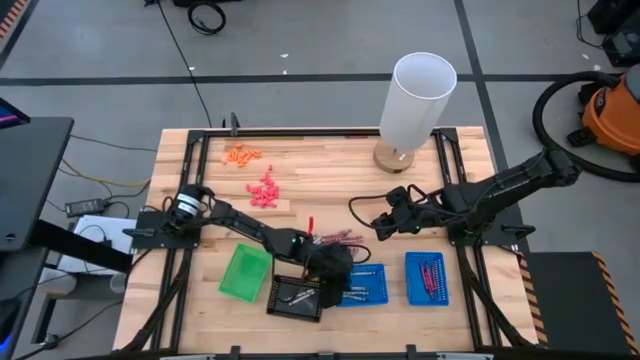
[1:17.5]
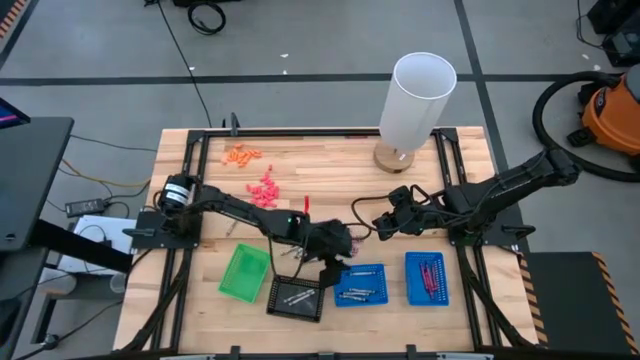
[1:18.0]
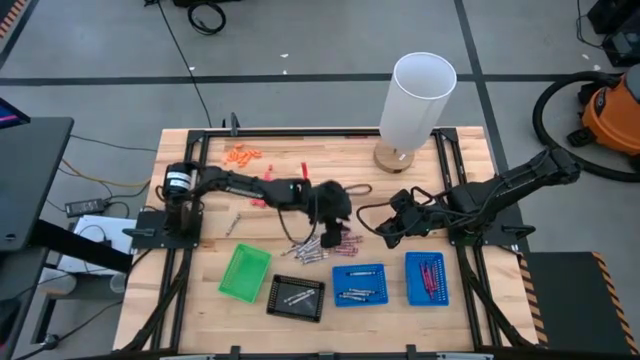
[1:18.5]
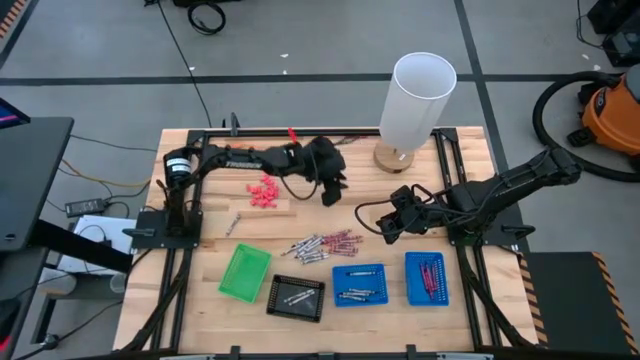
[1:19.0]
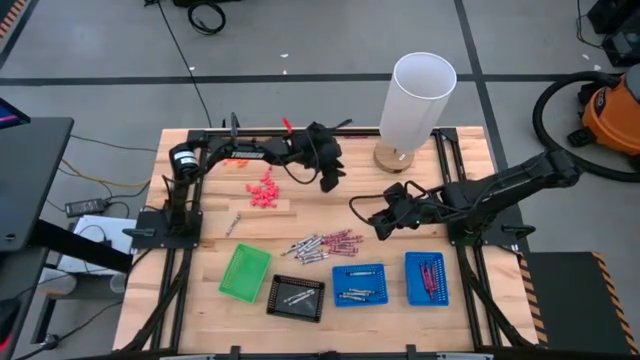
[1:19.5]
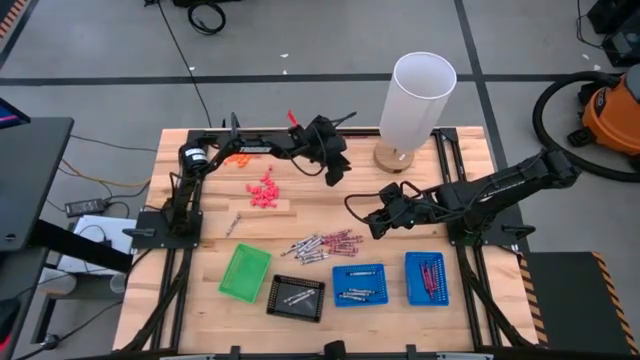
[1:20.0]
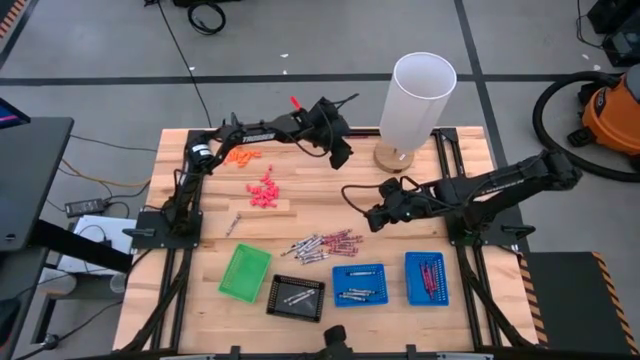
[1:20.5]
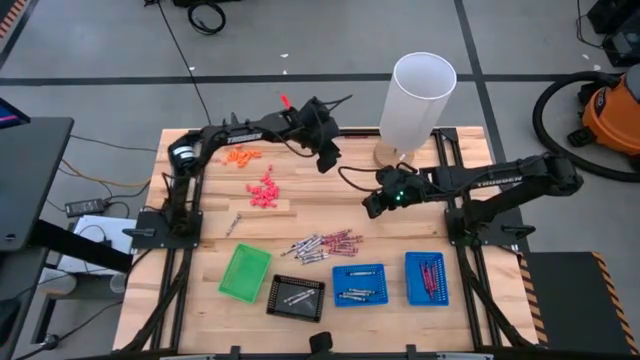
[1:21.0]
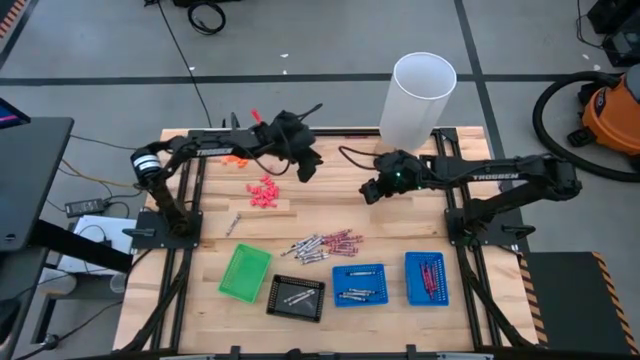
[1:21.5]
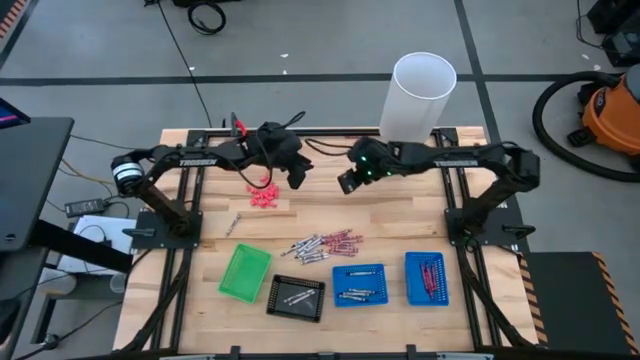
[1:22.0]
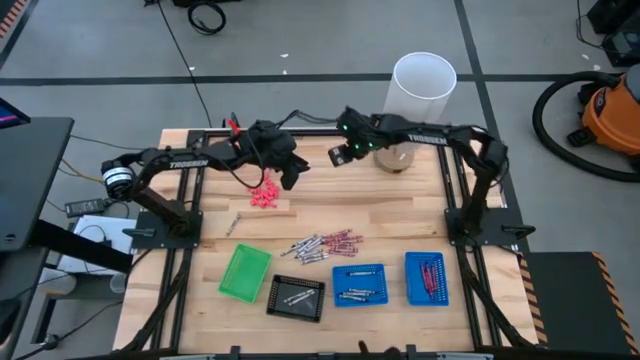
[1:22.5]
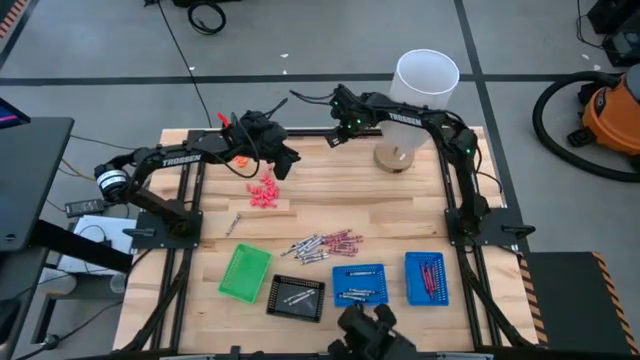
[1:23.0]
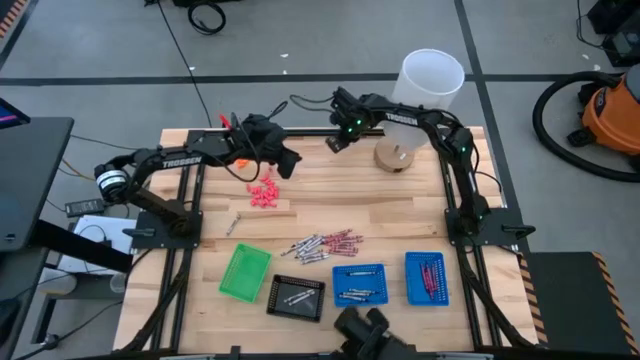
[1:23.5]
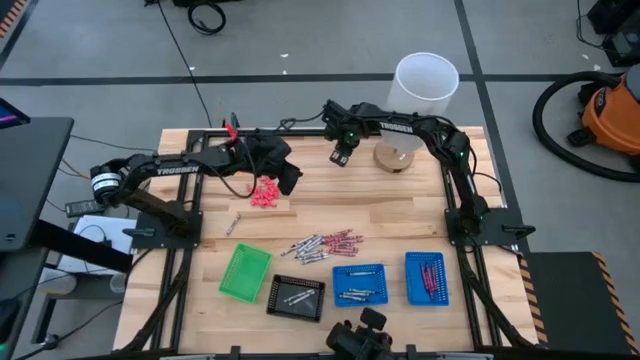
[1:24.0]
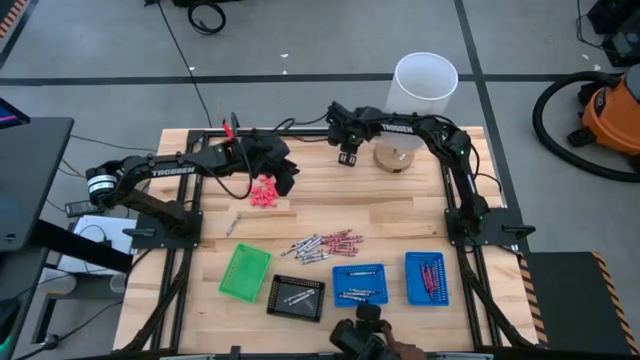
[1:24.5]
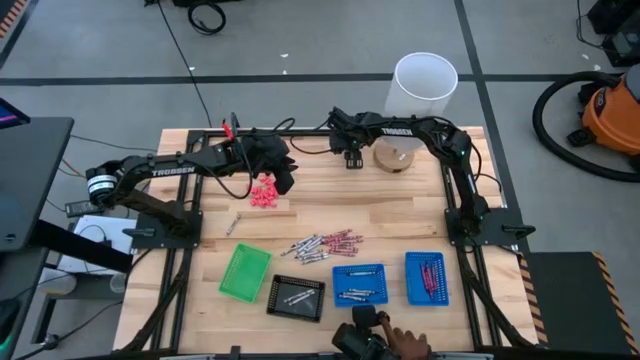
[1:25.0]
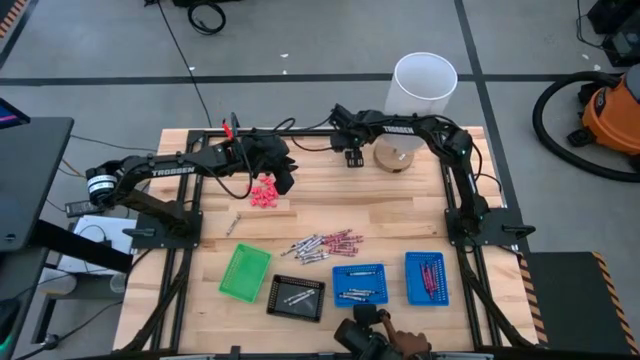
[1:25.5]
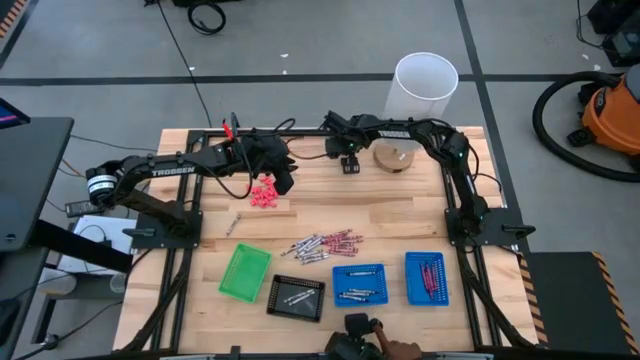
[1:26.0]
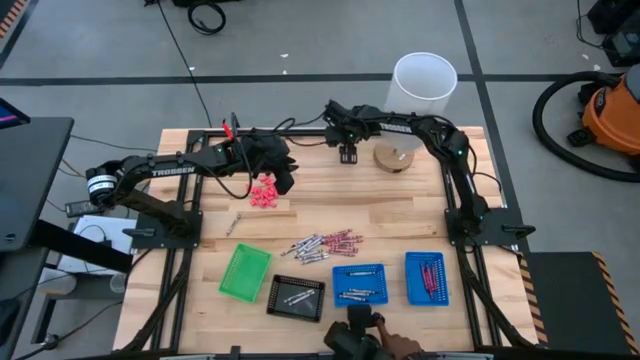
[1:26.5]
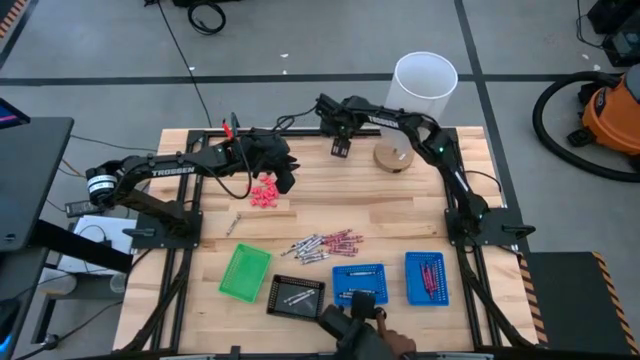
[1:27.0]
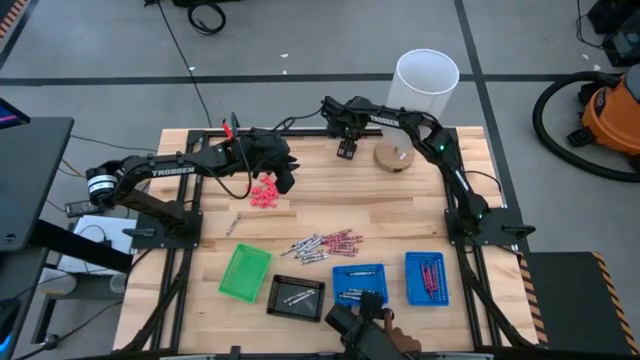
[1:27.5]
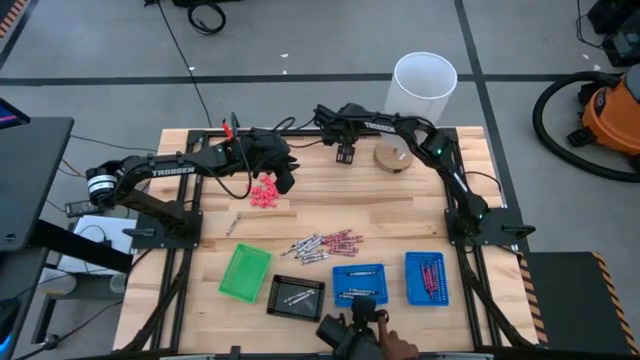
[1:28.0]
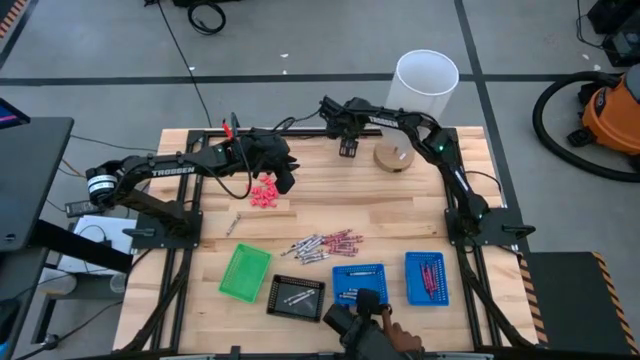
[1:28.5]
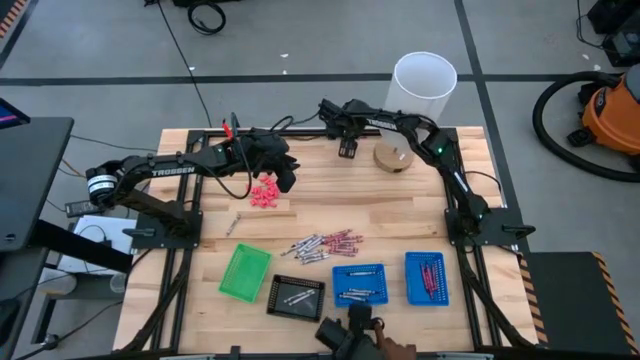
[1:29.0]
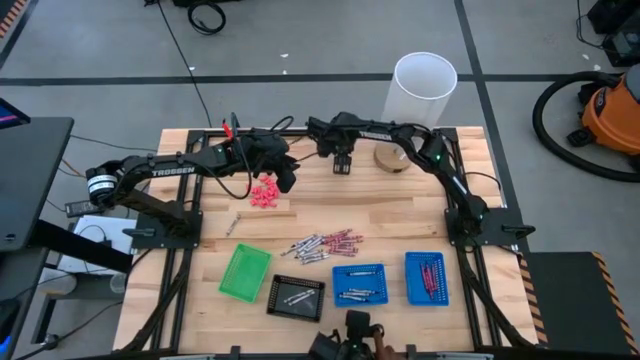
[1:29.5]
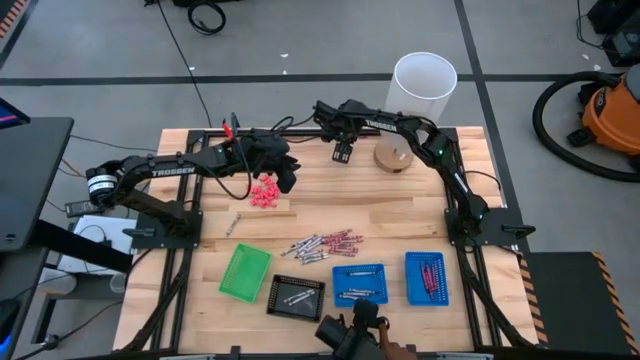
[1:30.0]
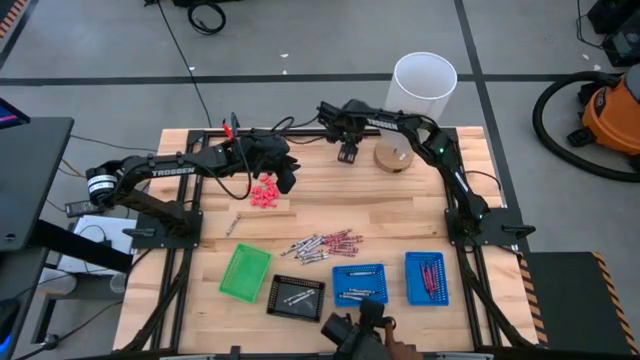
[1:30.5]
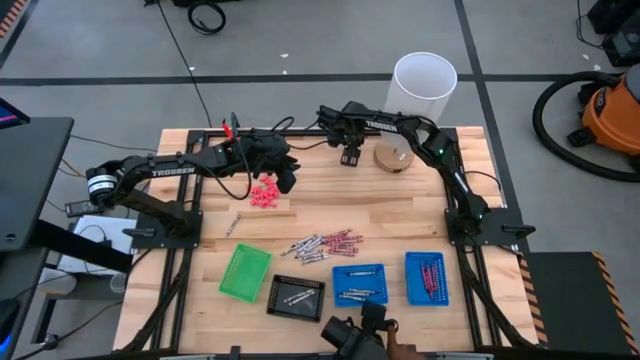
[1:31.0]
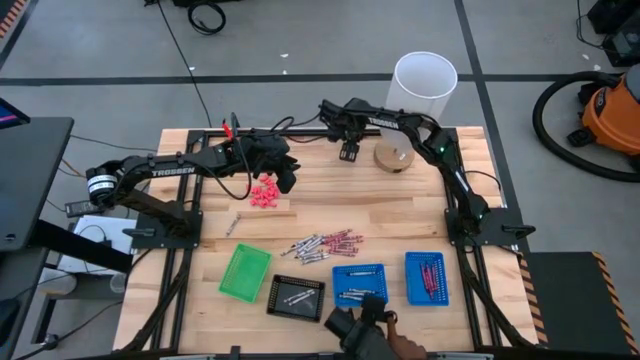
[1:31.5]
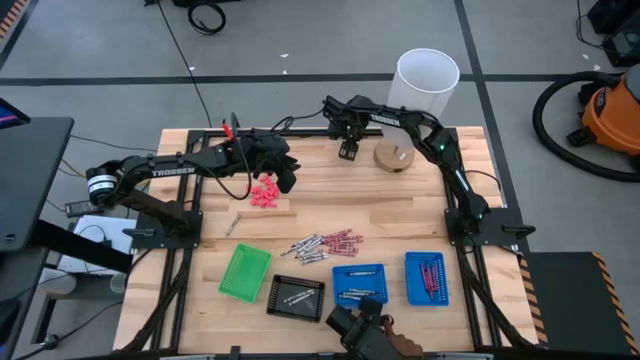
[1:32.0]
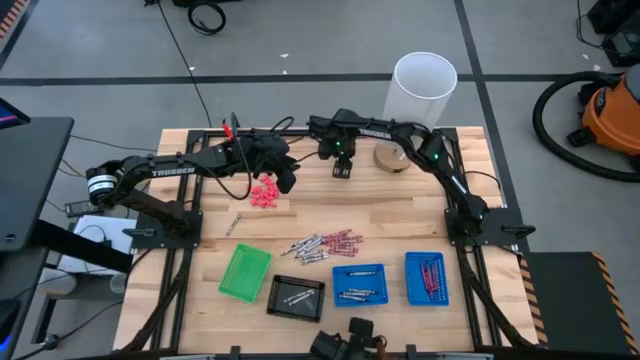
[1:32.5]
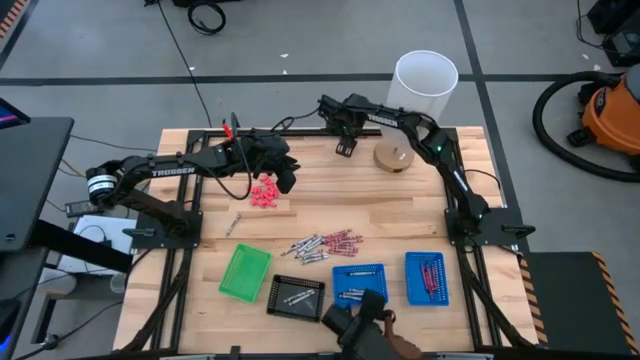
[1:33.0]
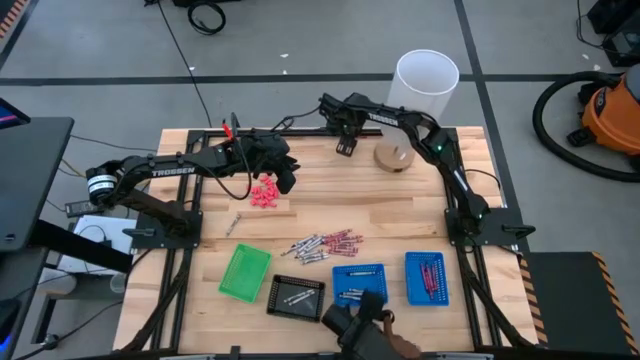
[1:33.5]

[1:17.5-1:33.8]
Task: Sort crayons
Put the red crayon into the right blue basket

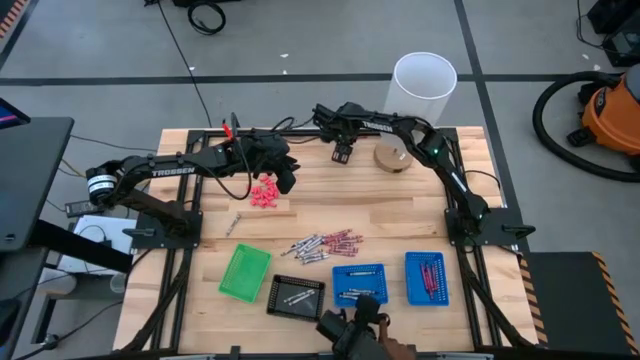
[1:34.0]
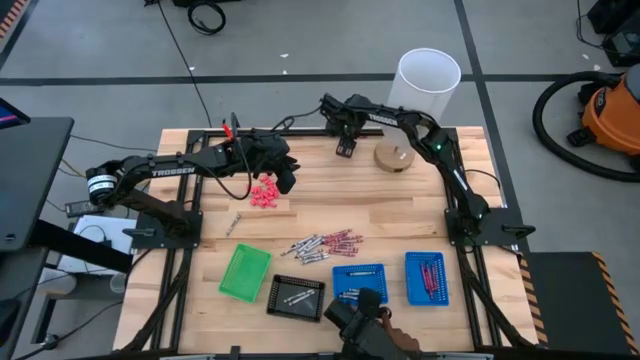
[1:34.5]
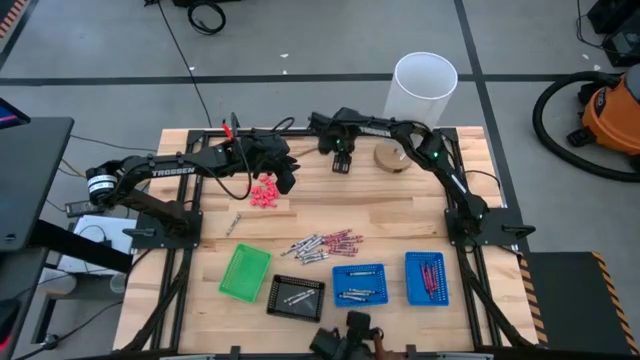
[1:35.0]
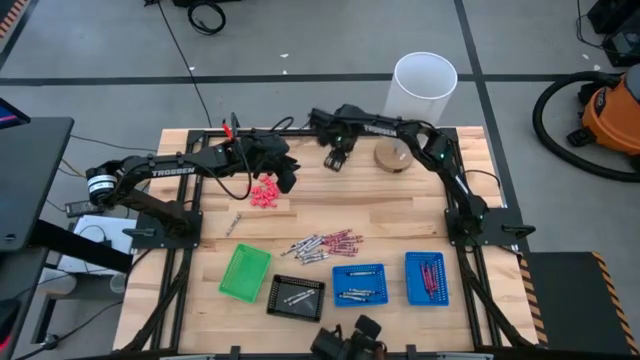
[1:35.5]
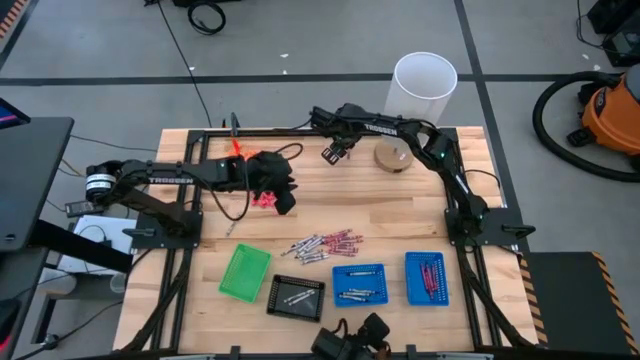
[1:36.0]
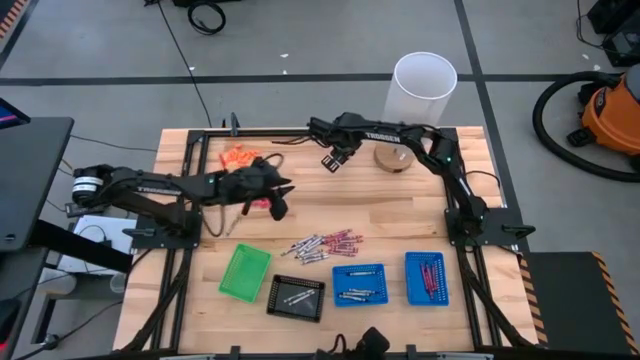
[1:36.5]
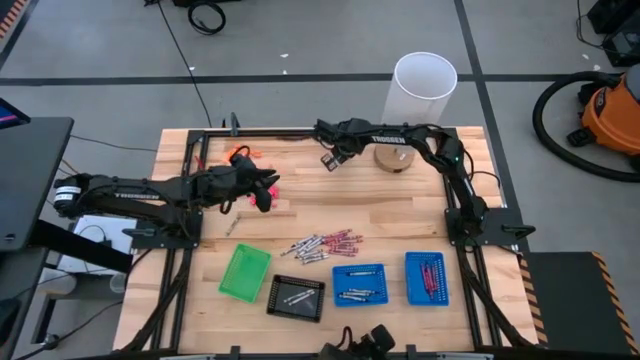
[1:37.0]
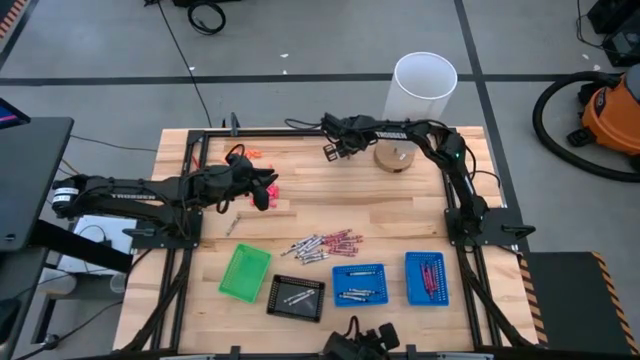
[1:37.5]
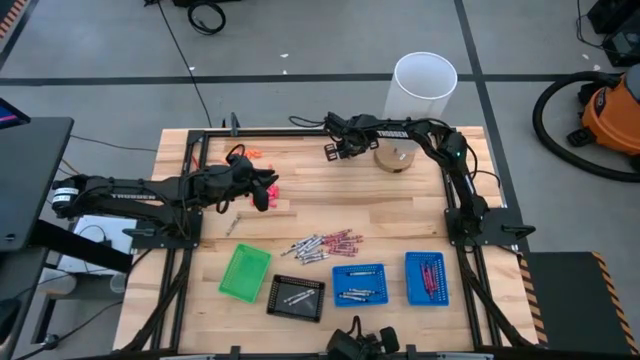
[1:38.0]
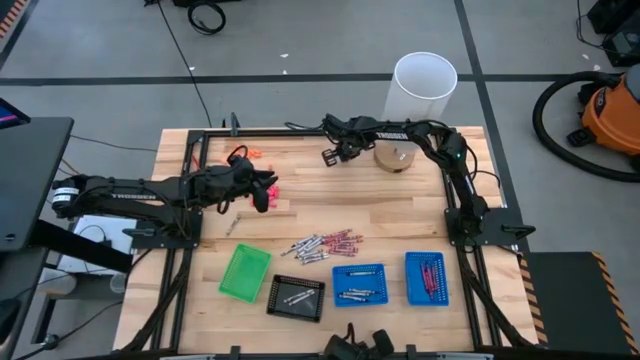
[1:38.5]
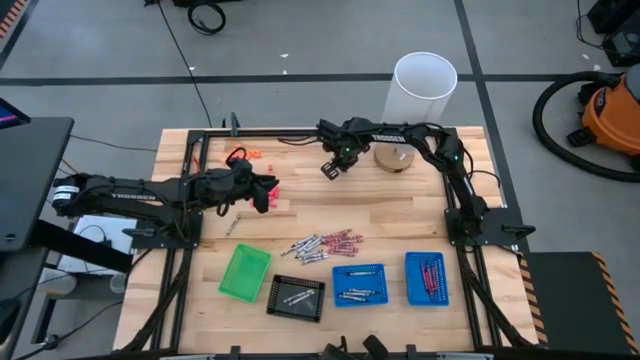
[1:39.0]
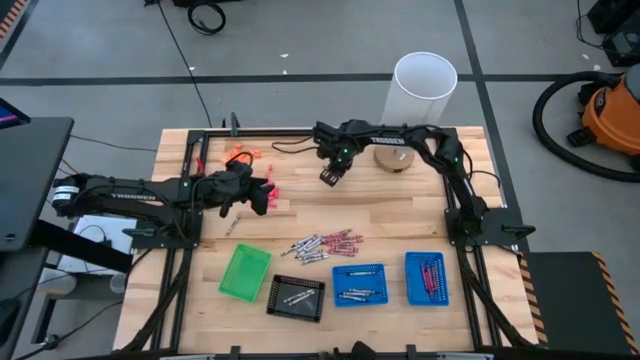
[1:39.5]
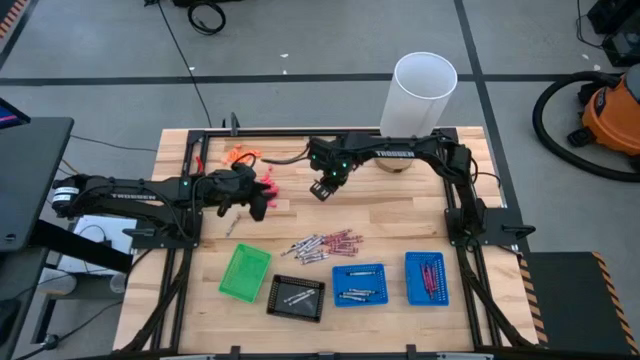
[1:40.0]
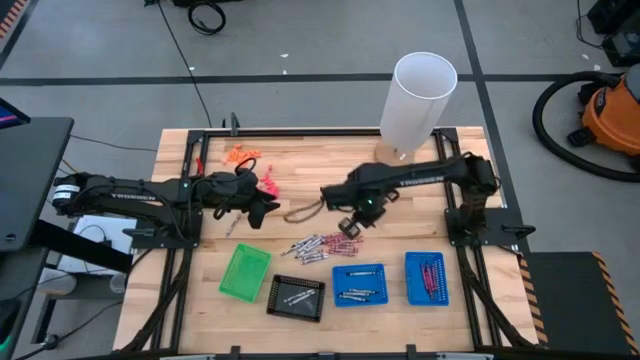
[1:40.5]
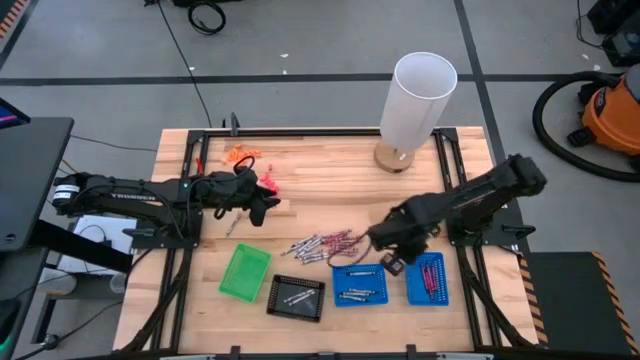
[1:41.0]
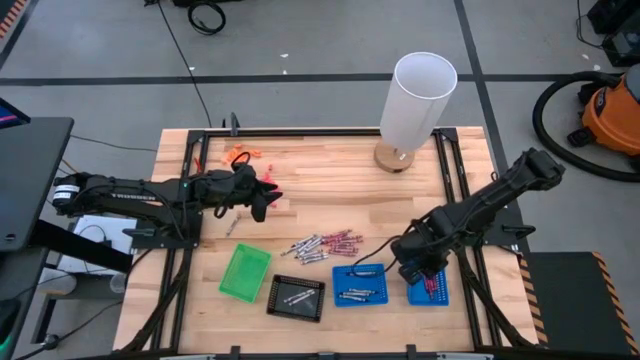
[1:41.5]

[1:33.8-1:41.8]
Put the red crayon into the right blue basket
